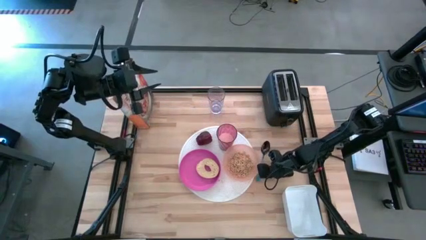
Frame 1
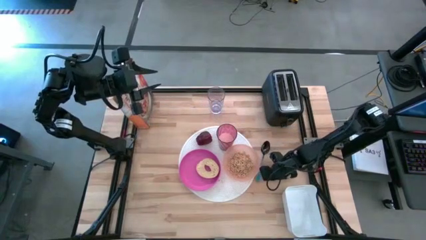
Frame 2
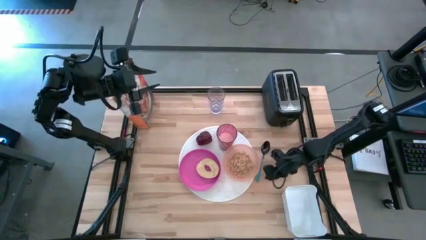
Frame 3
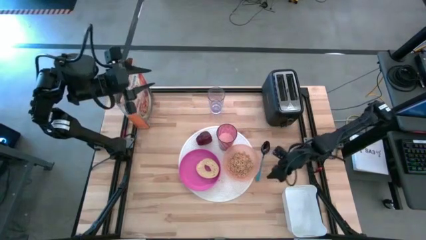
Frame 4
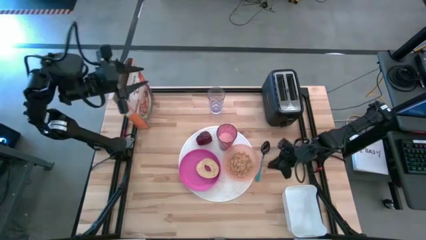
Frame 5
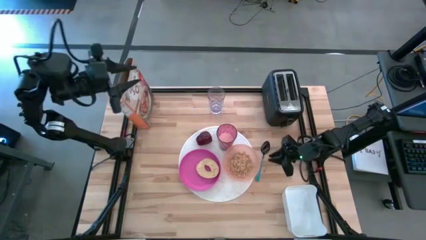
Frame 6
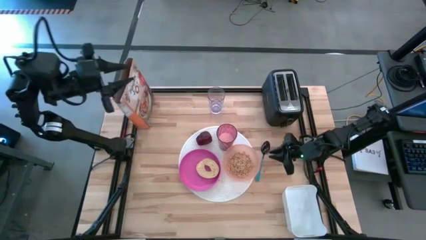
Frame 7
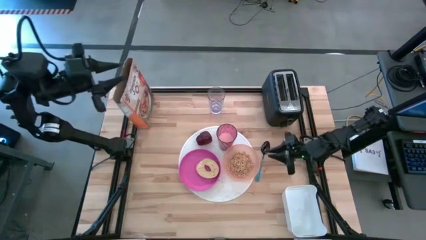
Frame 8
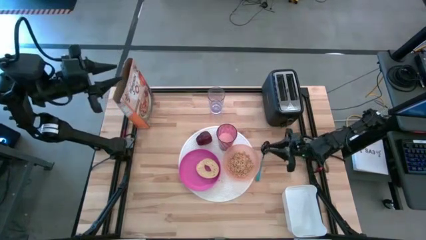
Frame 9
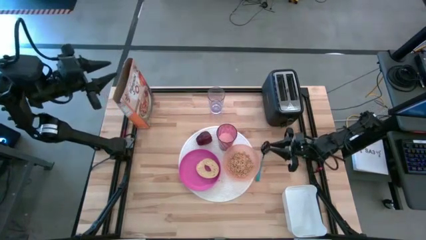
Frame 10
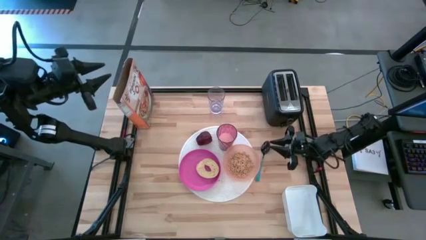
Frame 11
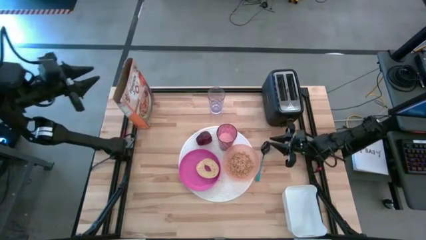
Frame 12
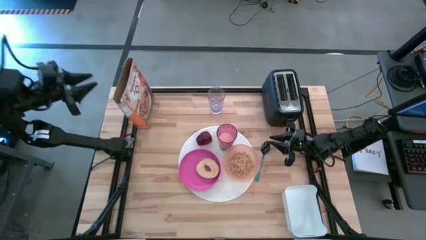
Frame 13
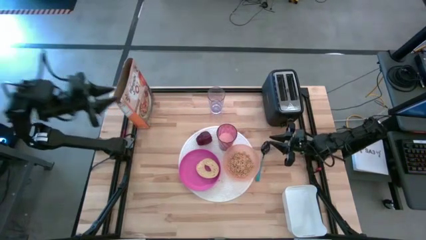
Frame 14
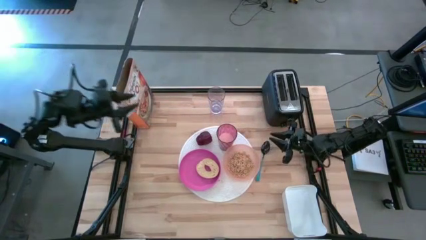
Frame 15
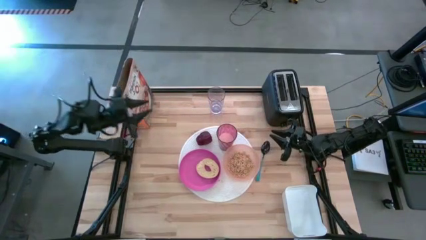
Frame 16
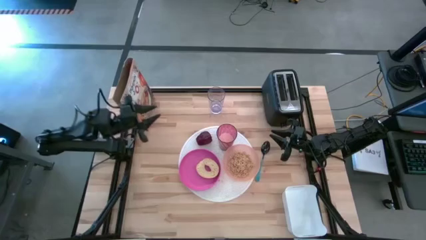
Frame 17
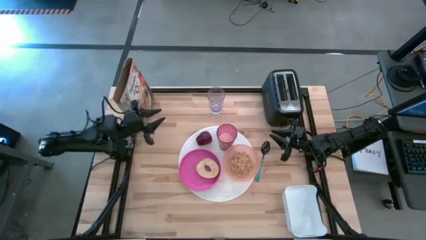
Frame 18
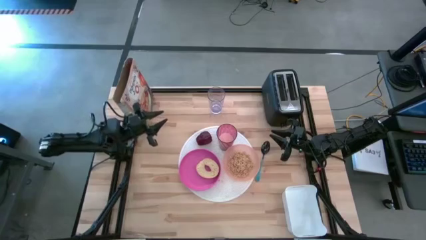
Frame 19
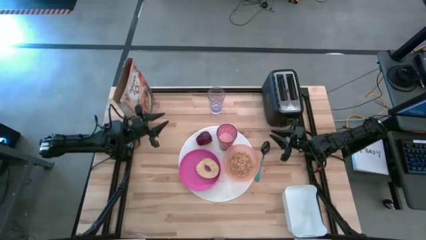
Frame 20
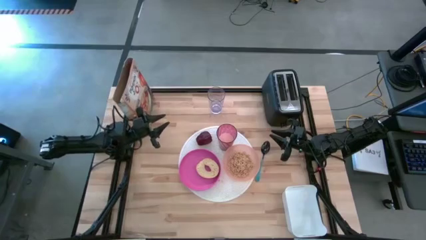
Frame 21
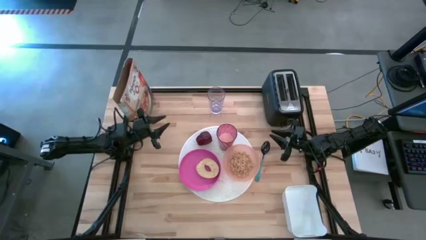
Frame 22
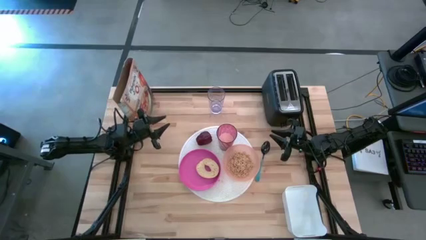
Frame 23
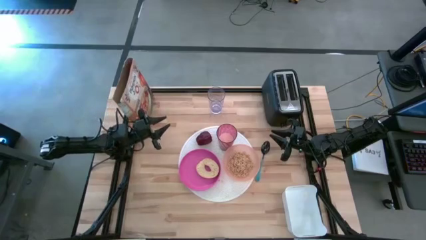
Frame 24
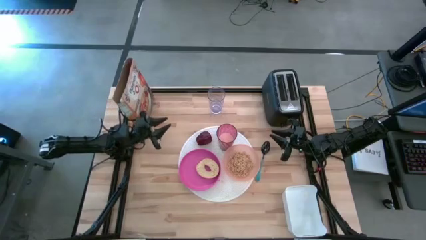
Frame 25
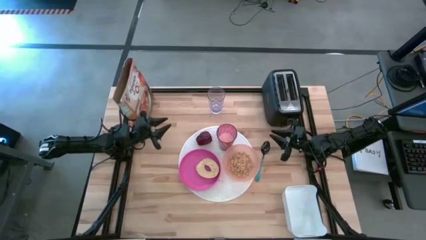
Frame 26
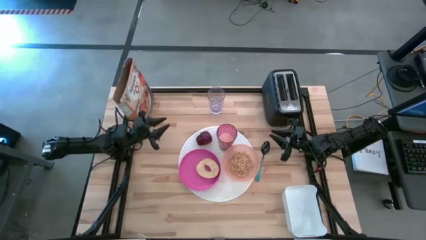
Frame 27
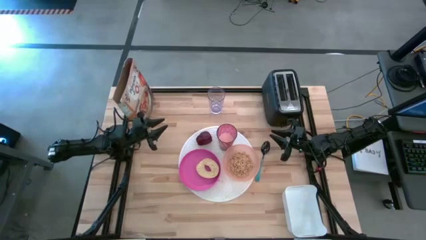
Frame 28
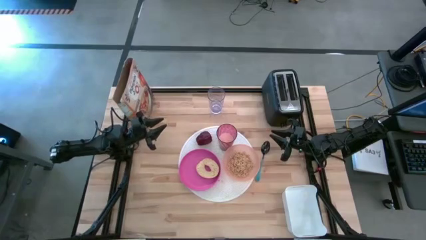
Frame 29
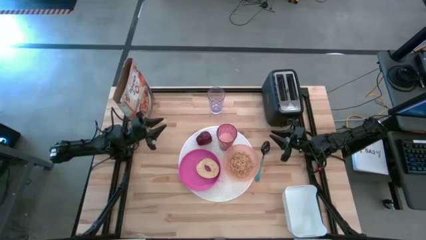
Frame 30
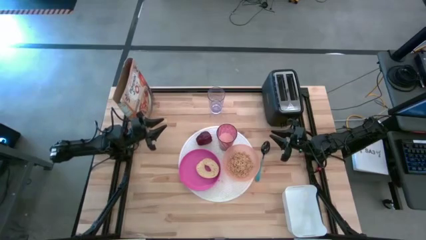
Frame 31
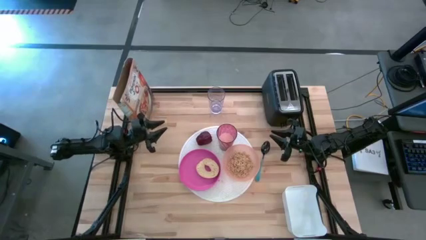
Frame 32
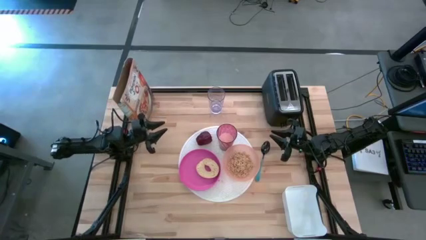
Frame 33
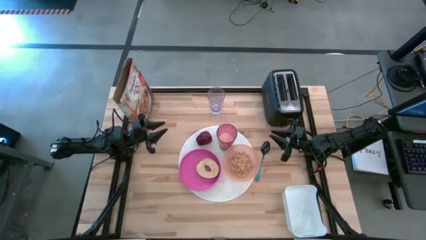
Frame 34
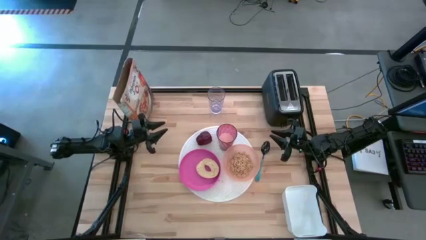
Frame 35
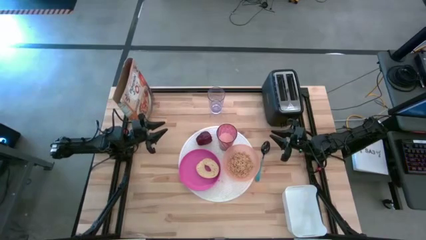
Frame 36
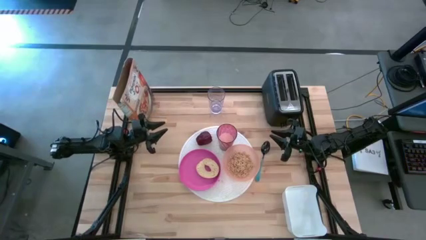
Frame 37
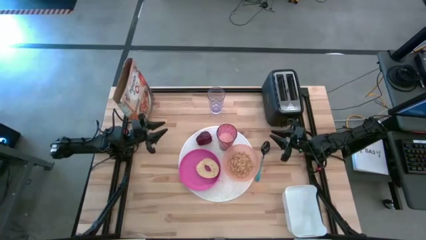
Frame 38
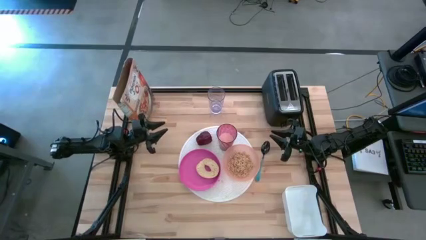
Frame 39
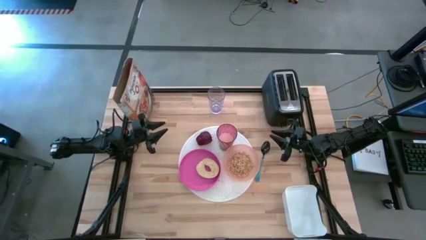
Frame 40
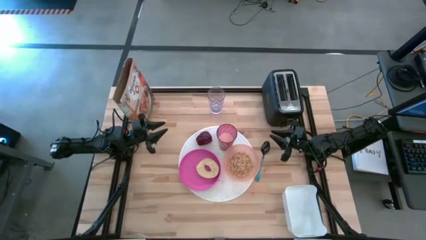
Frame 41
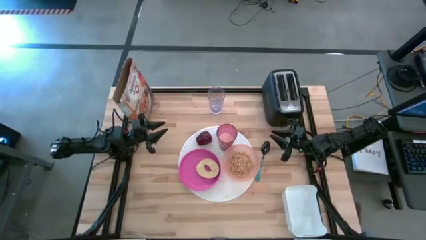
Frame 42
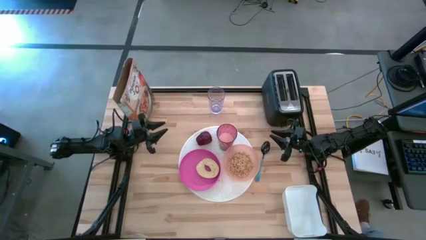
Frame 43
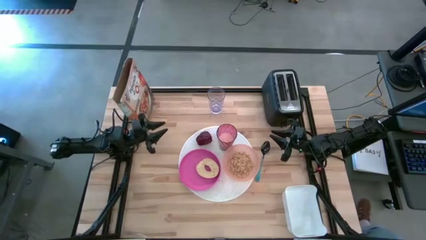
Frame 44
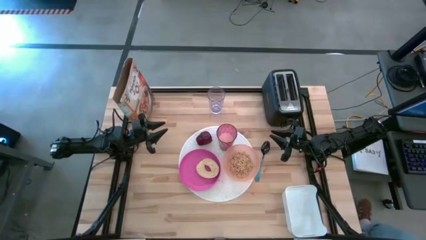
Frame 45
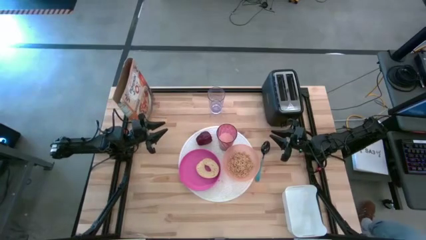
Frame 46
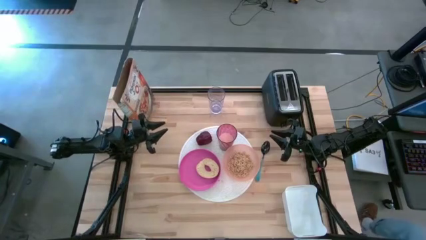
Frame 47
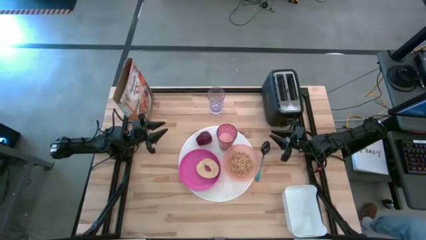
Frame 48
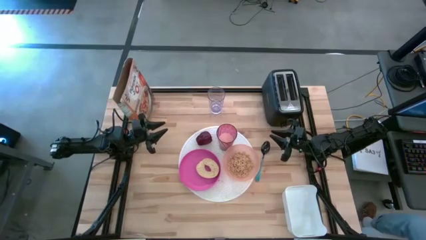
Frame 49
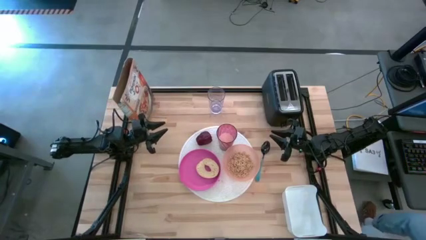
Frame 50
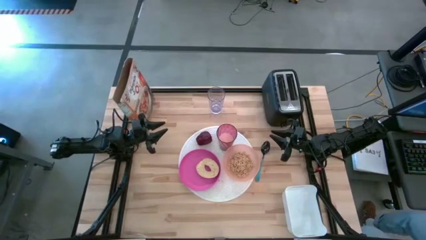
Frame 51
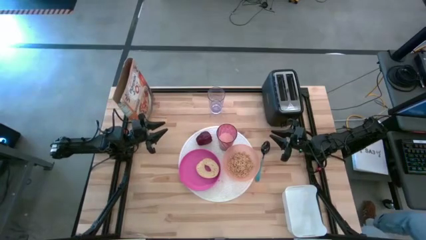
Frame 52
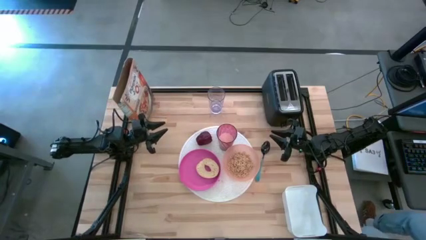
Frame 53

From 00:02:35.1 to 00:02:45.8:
Task: Arrange a breakfast setting
Return to Home Position
